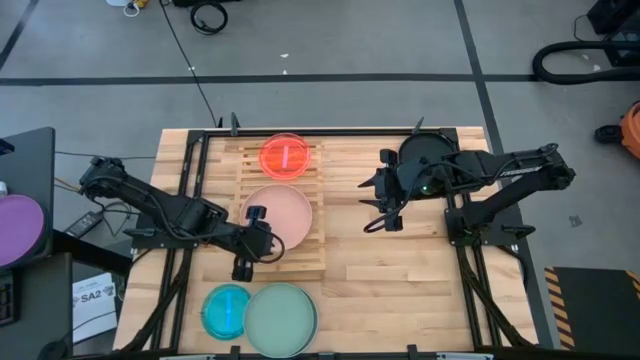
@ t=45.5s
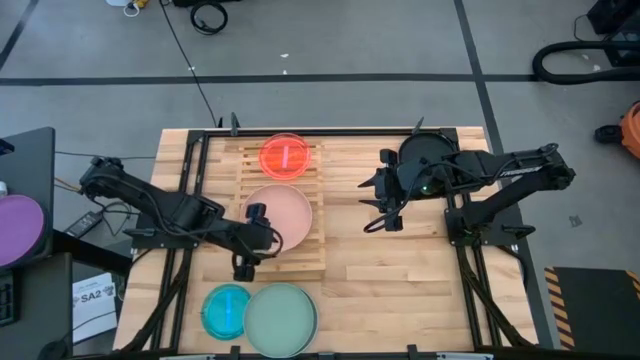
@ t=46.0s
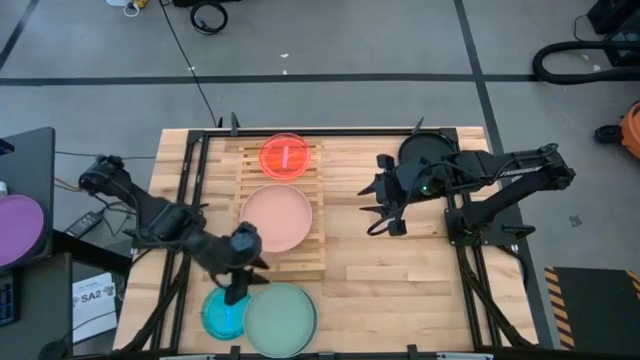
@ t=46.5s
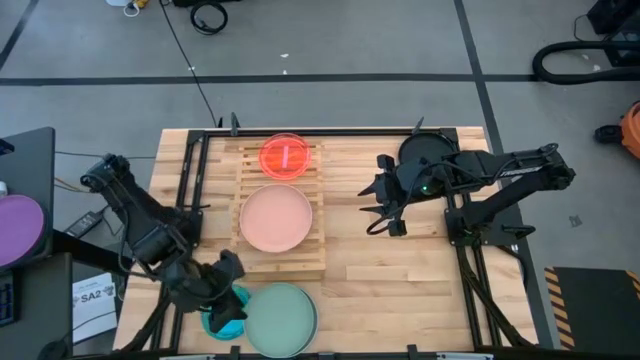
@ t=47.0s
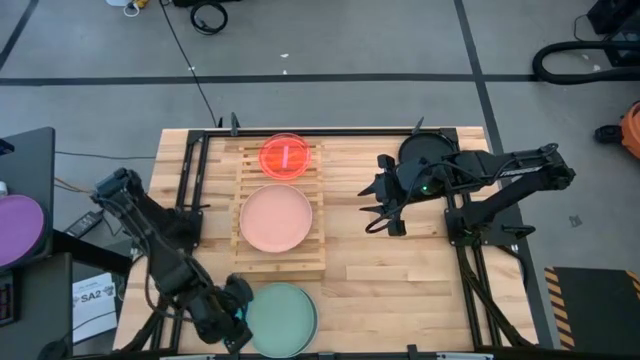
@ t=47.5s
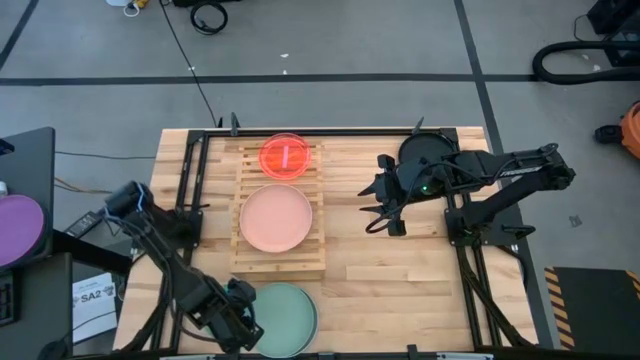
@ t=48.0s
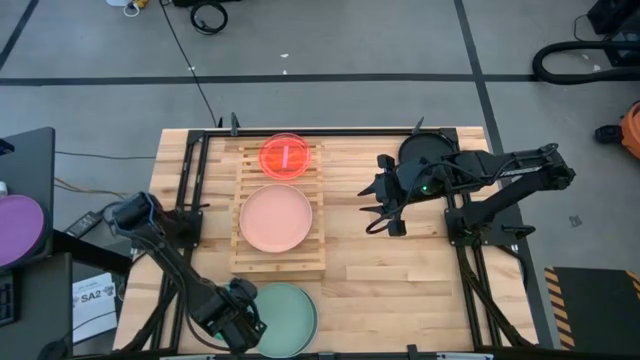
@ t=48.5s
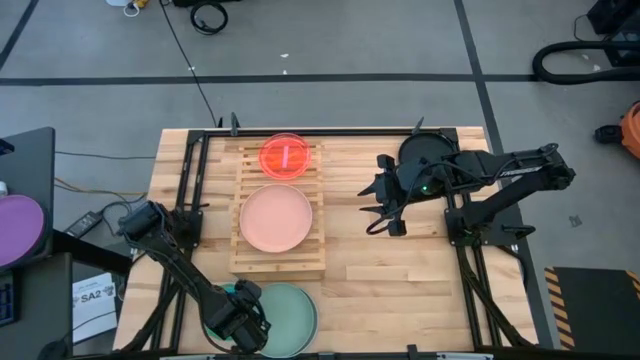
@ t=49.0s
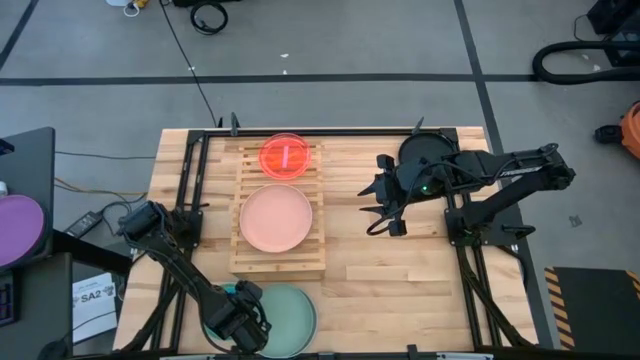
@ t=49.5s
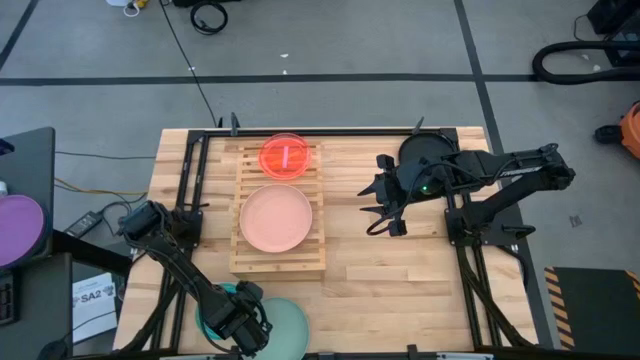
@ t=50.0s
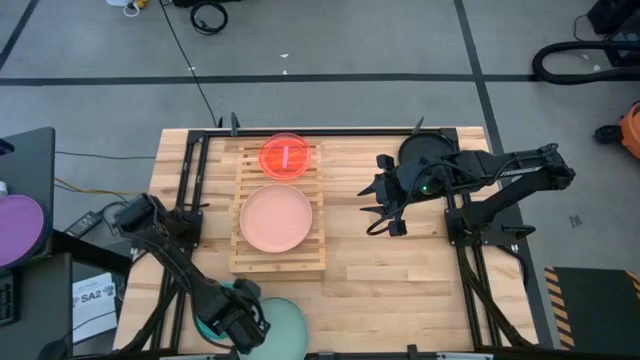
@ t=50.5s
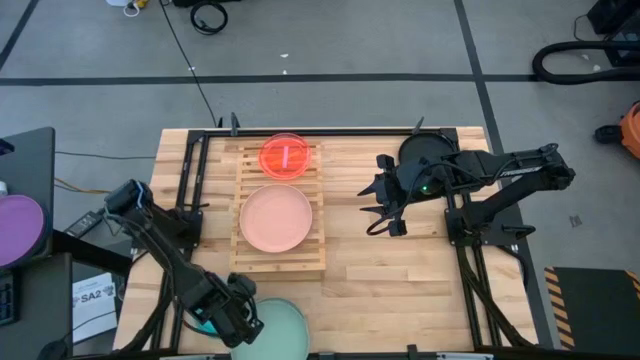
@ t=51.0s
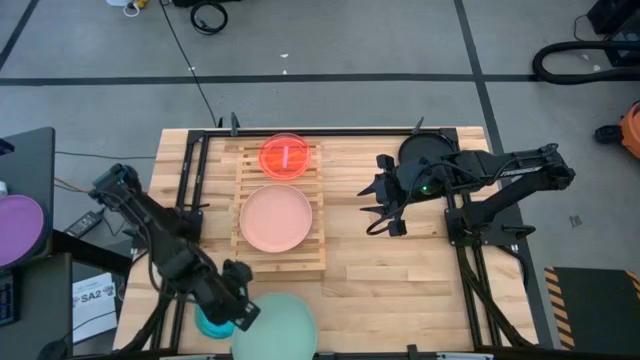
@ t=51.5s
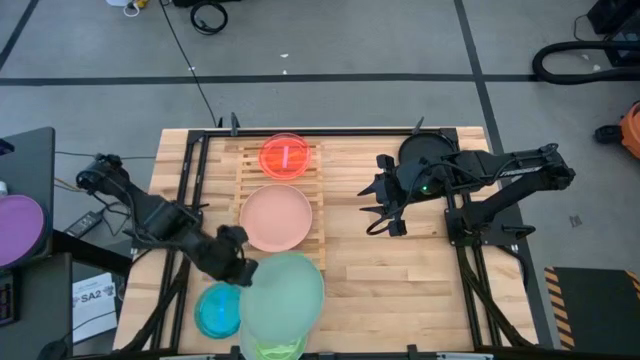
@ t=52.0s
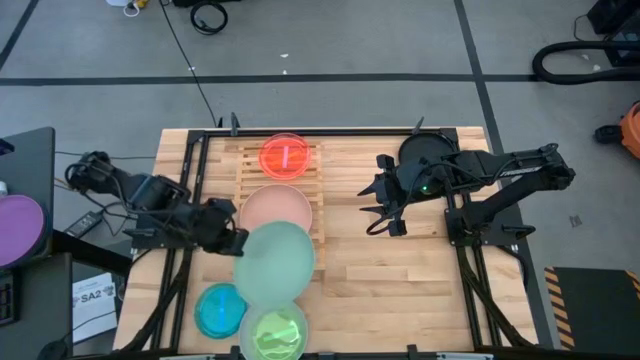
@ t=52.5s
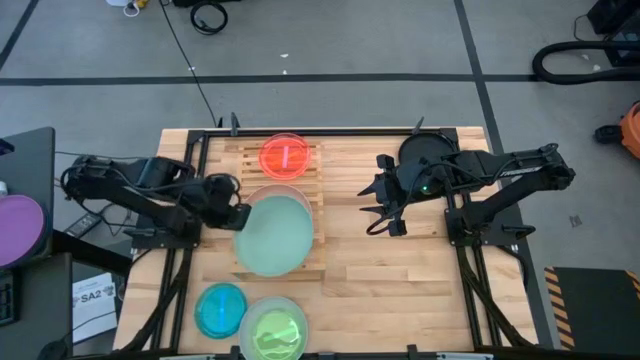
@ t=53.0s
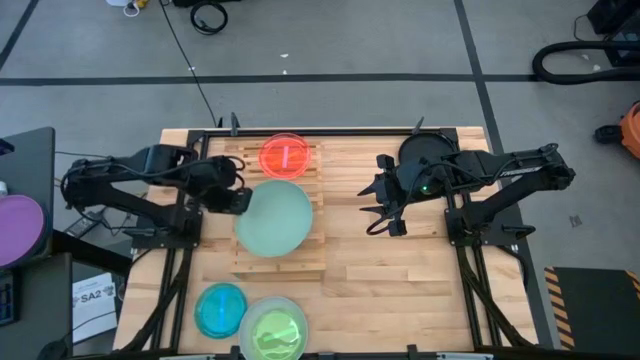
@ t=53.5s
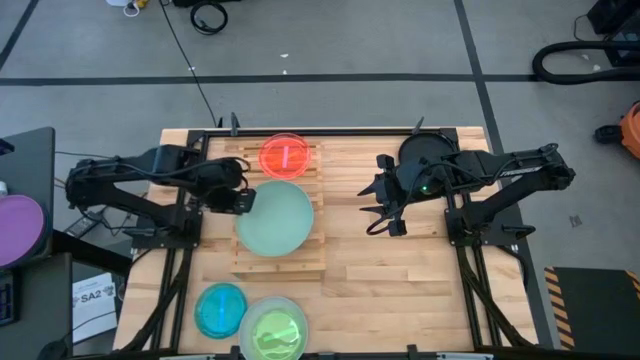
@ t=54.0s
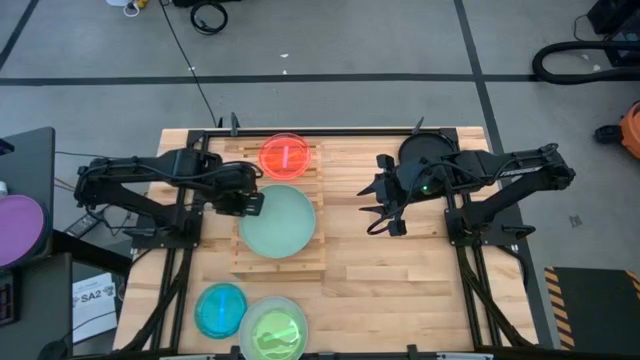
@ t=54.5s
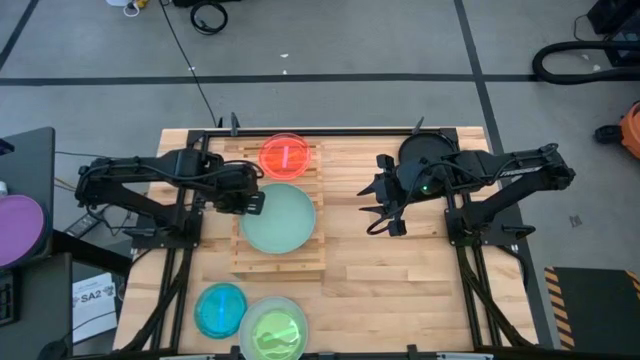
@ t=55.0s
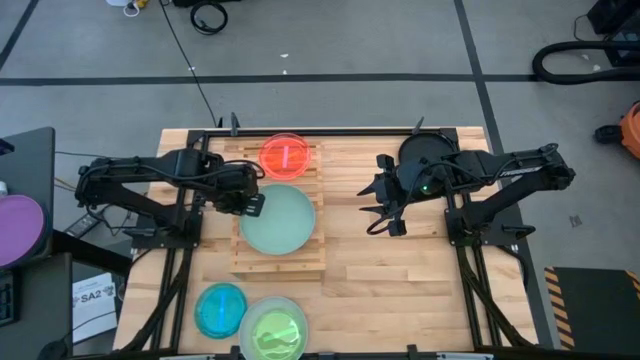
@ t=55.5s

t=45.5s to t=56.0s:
Task: Place and stack plates onto a shelf
Stack the light green plate on the light brown plate

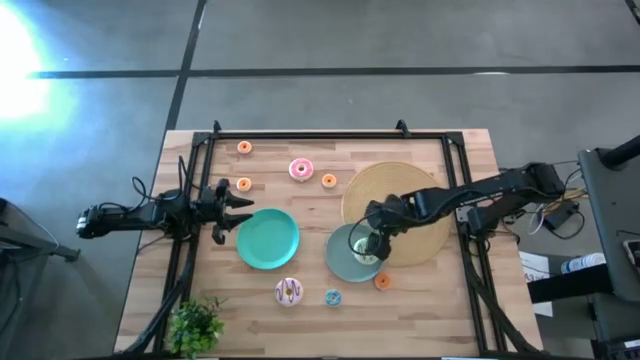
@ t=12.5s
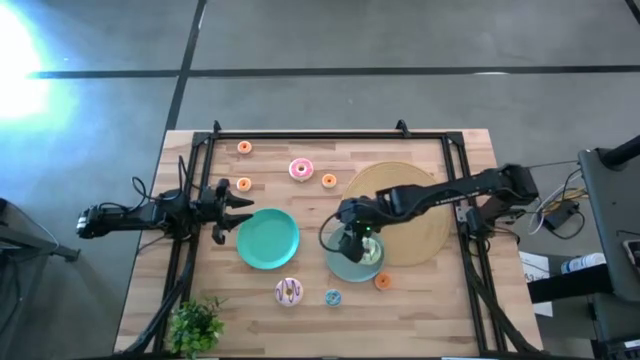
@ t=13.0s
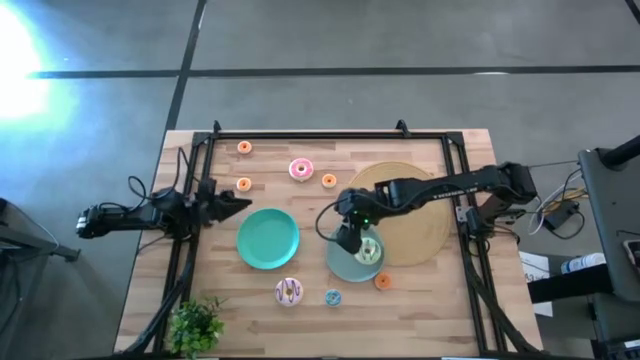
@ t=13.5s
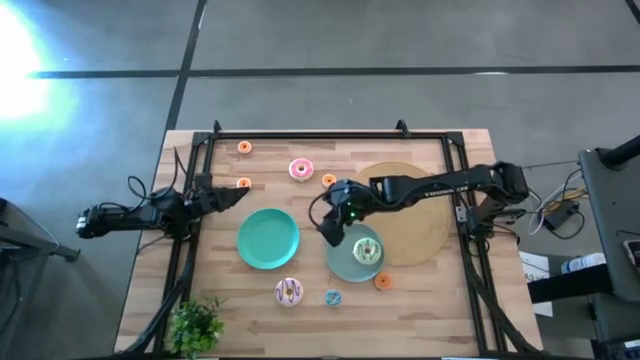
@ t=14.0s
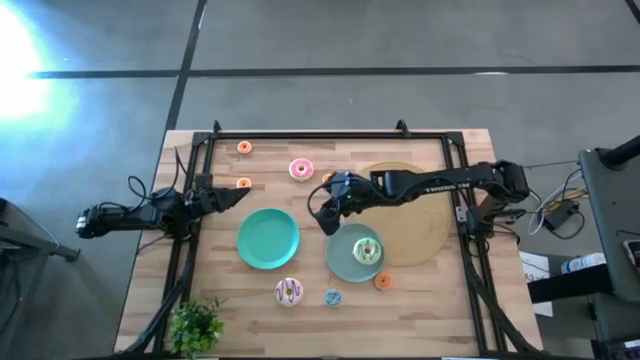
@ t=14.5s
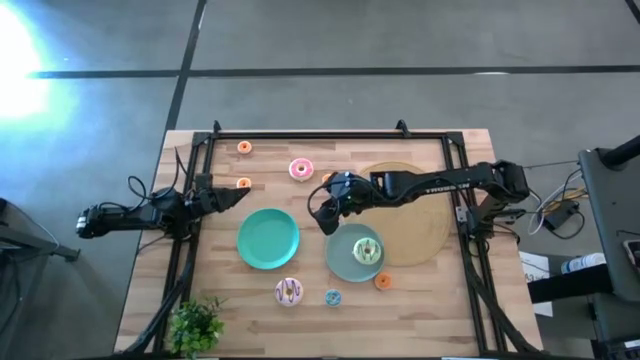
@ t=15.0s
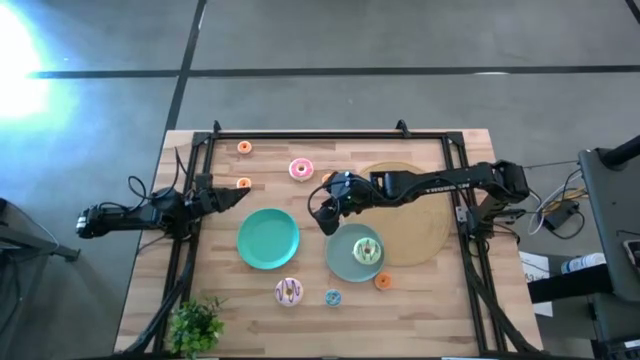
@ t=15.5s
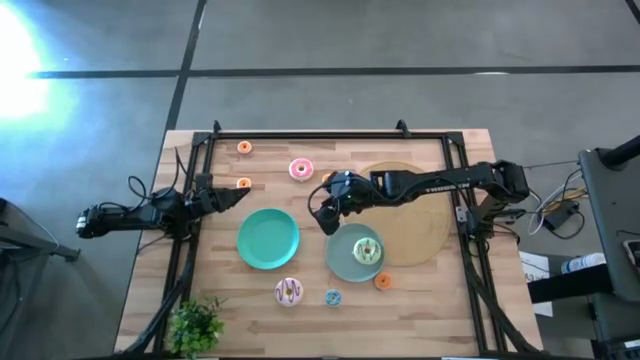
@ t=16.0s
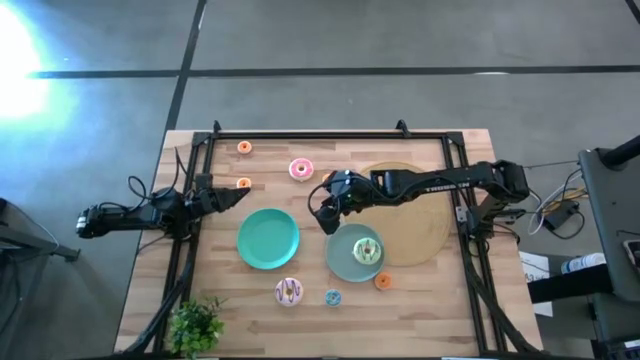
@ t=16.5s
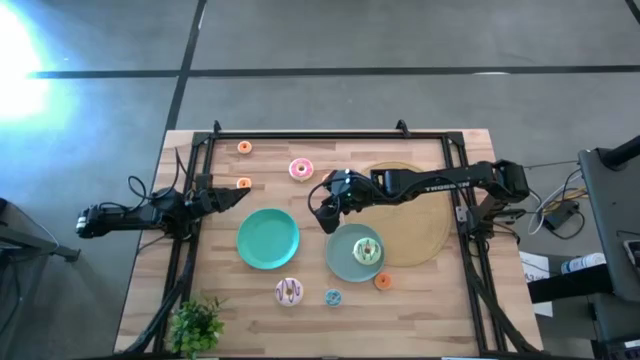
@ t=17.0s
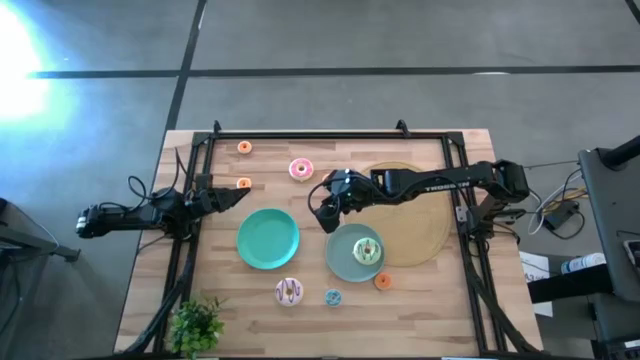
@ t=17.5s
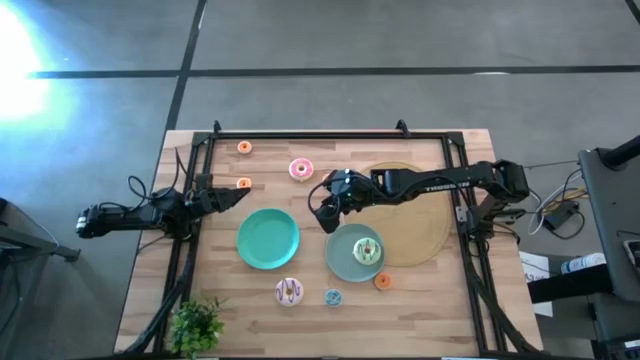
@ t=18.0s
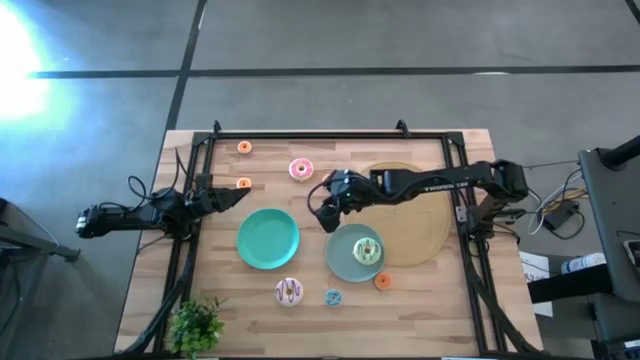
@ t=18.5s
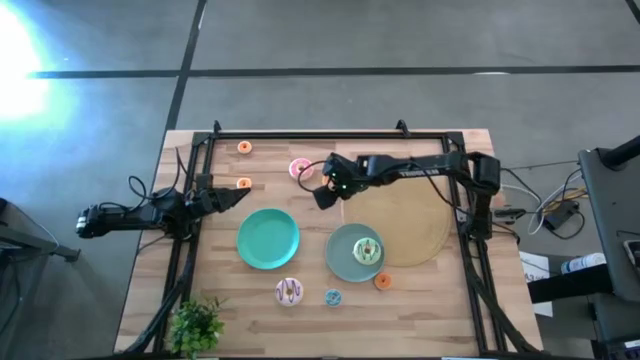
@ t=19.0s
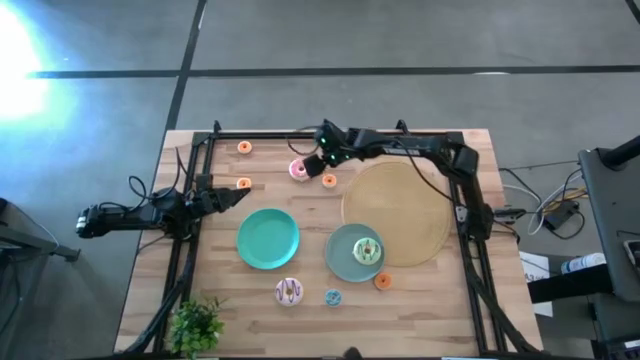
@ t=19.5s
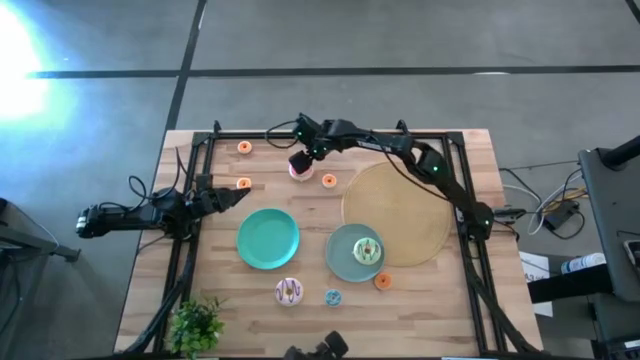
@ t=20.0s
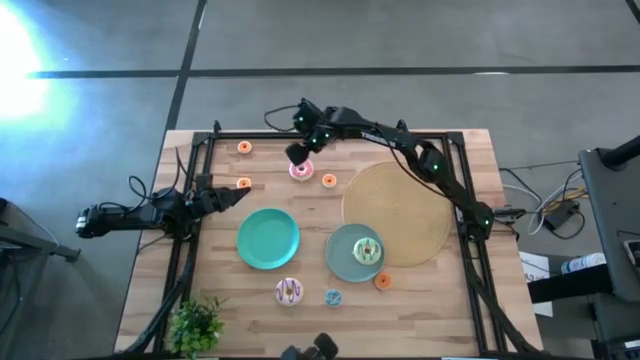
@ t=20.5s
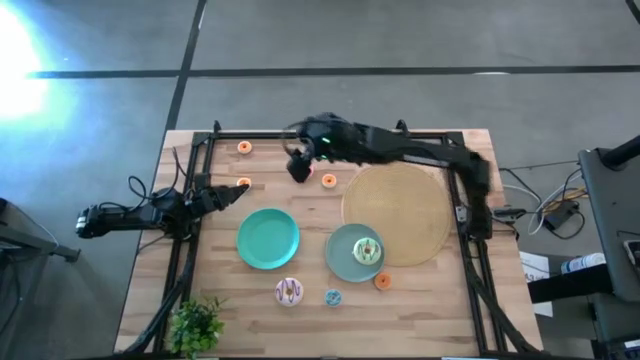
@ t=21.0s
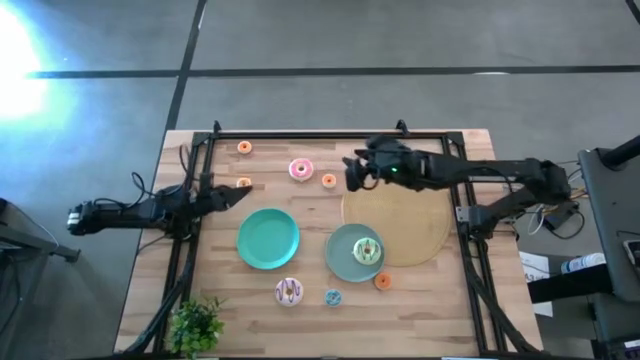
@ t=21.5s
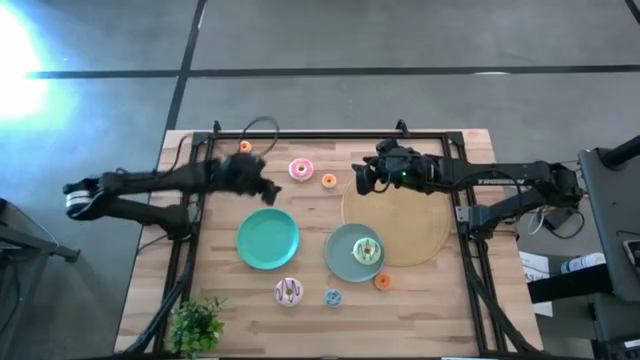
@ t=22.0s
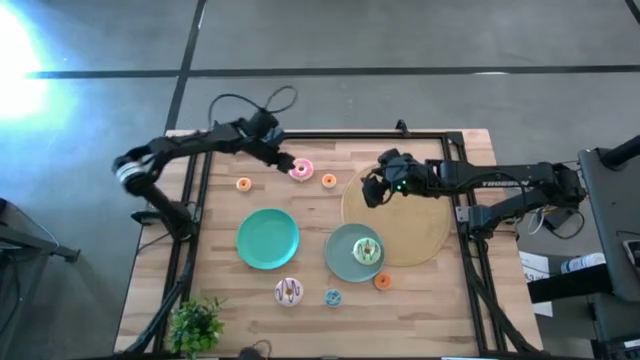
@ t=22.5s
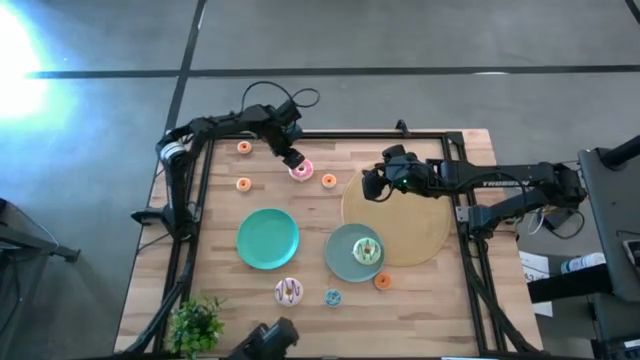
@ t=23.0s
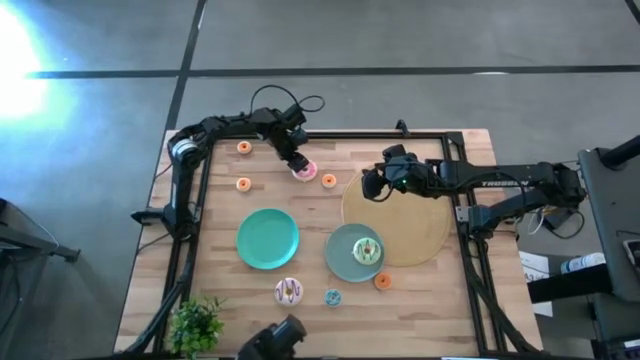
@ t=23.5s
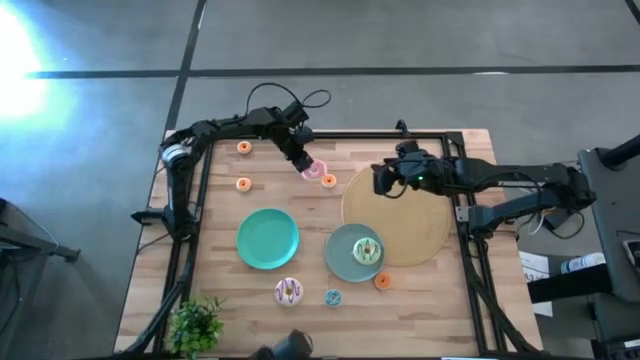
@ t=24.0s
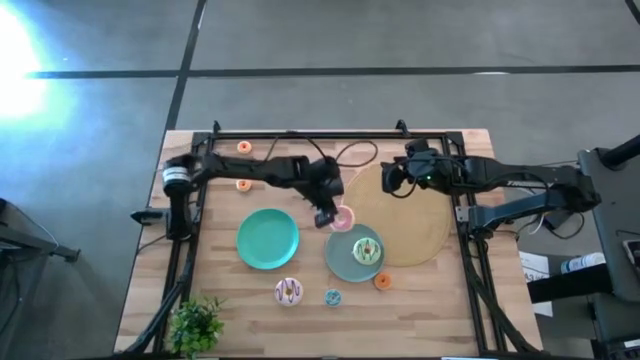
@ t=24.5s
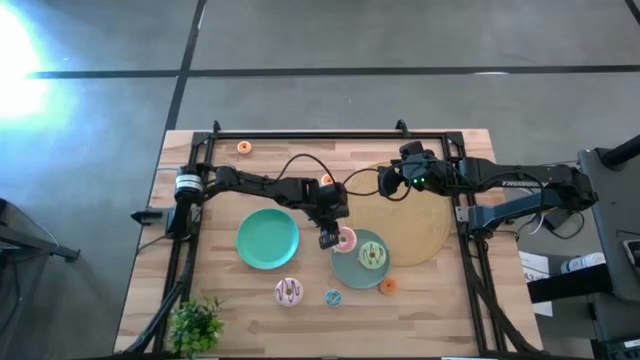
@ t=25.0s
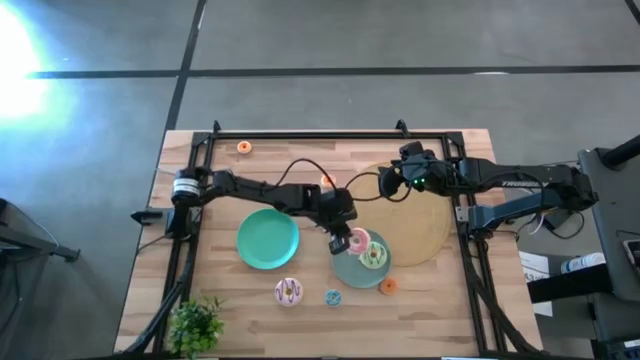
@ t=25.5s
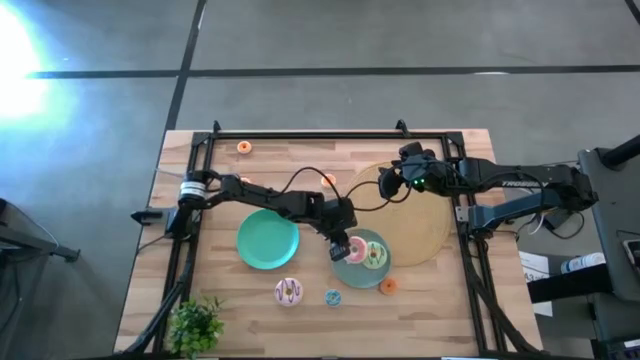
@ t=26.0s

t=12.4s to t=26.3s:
Task: Pick & Place donuts
Put the big pink donut on the gray plate
